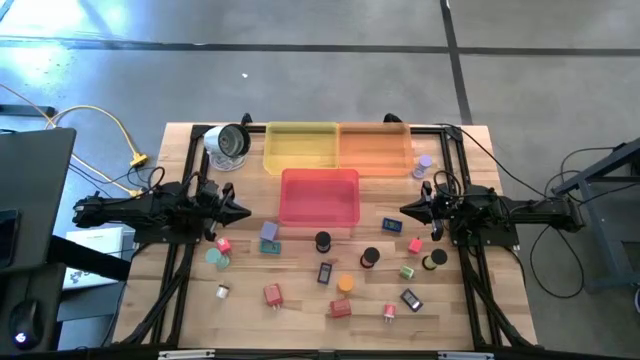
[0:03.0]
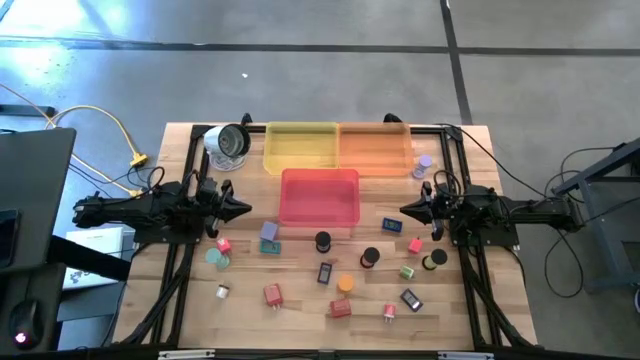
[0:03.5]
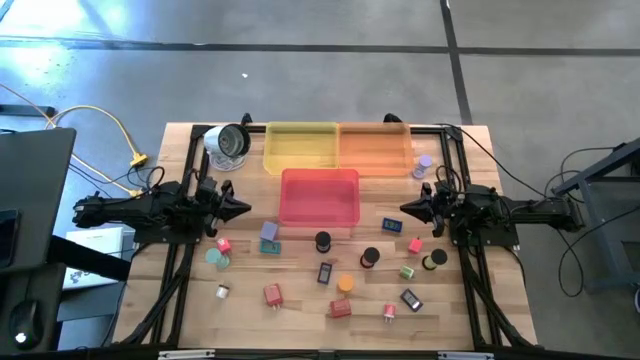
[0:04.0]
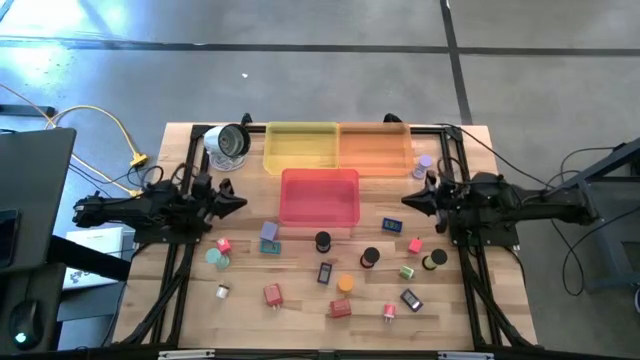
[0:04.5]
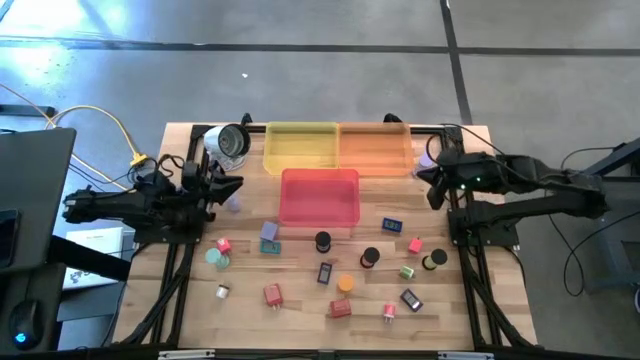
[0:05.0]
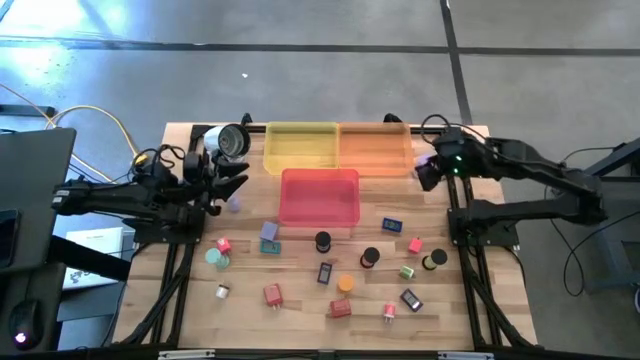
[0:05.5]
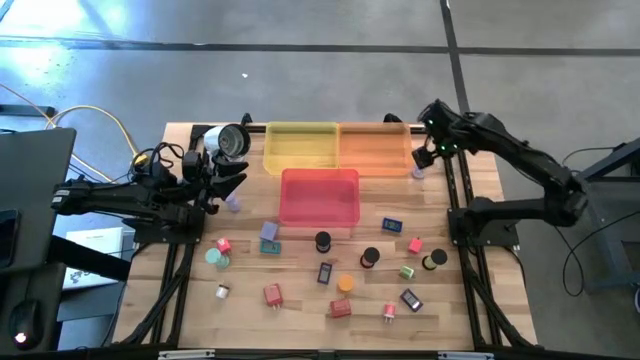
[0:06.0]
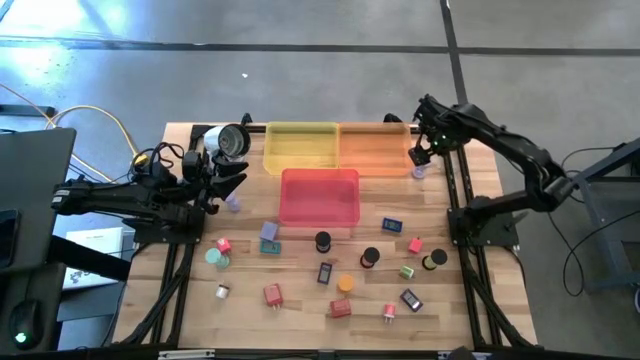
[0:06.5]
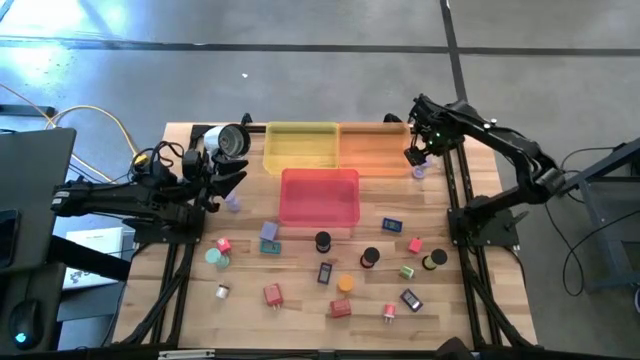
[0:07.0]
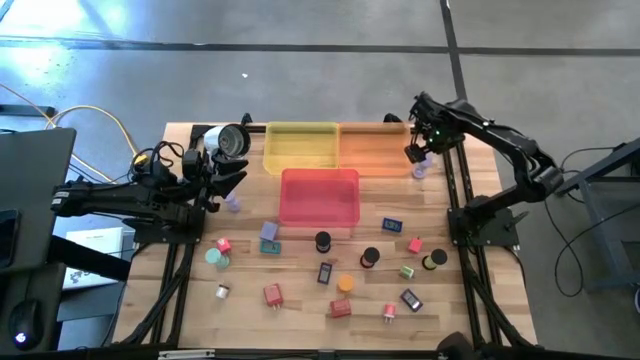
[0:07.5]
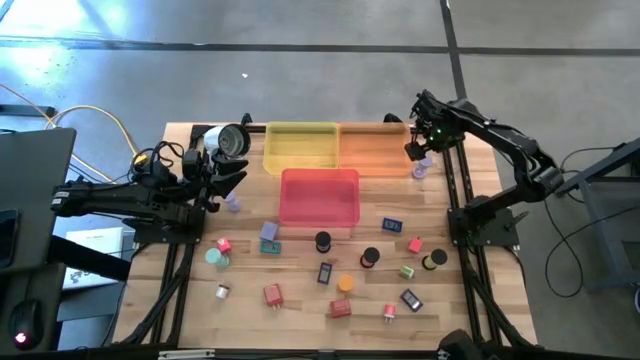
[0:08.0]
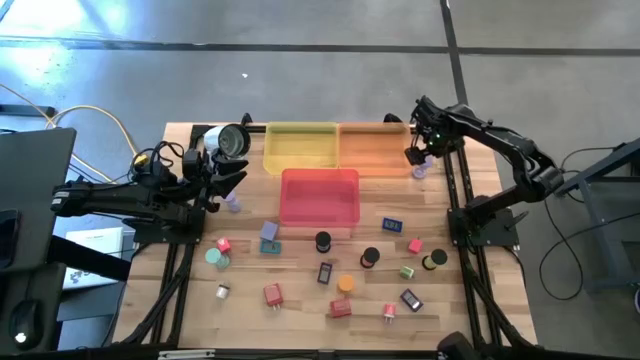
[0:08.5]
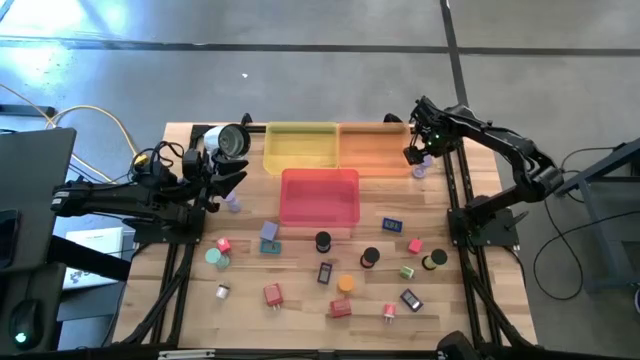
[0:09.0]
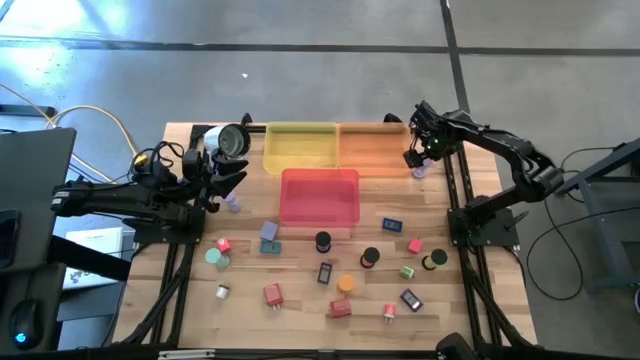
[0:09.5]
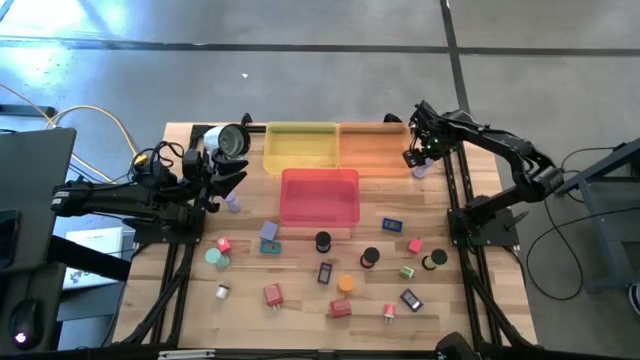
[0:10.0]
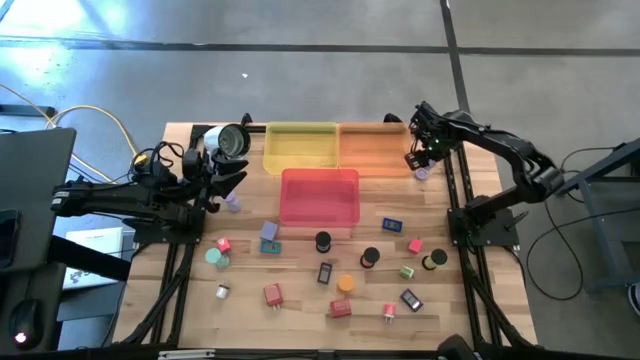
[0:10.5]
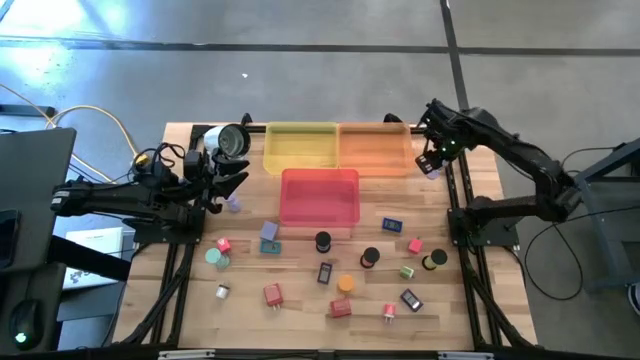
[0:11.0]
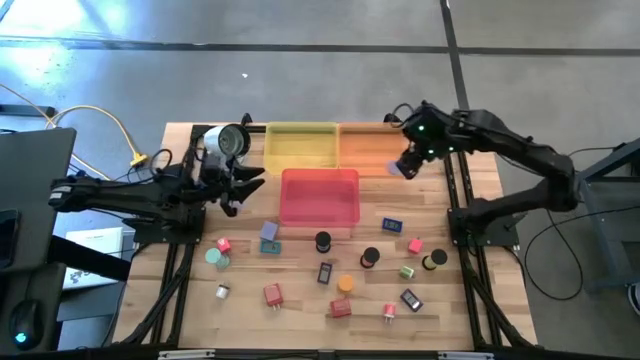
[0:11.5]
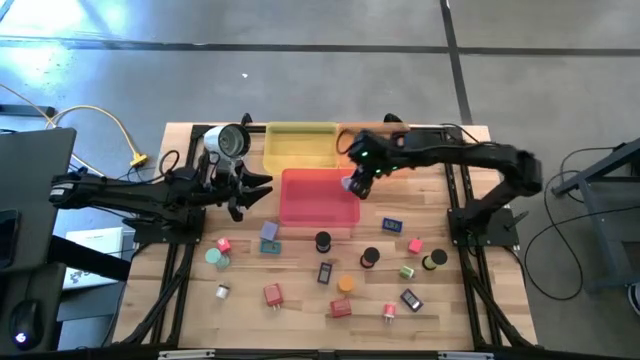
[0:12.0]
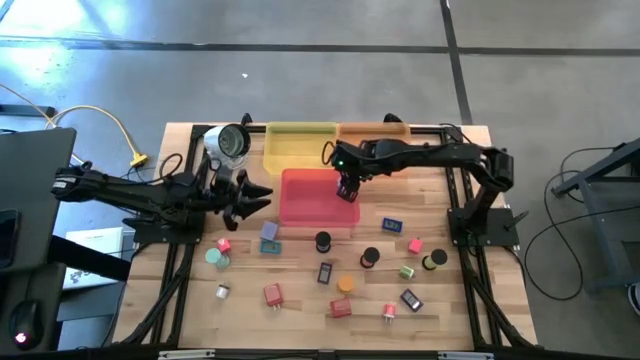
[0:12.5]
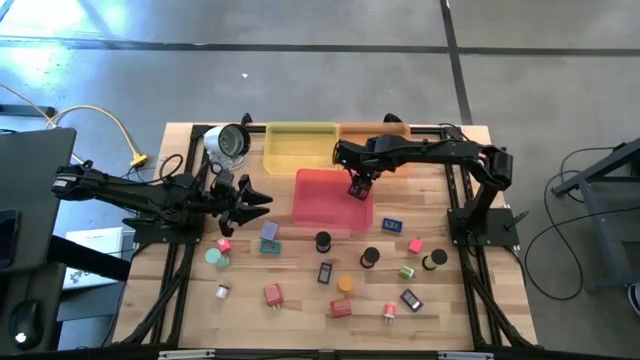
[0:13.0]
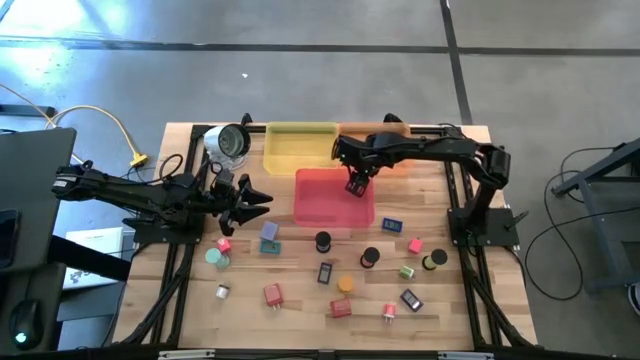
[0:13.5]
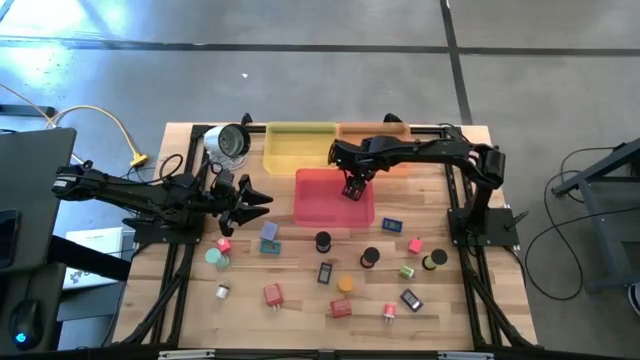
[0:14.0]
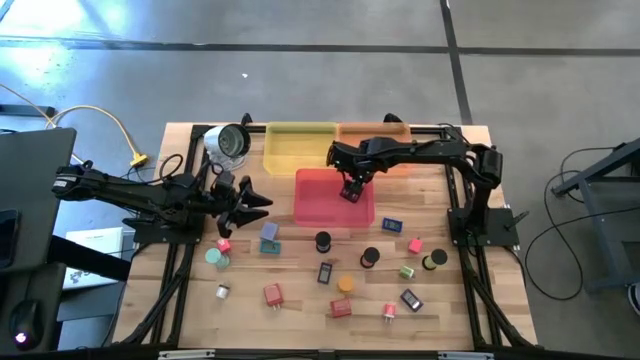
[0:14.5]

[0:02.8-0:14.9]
Task: Pick & Place Office items
Put the right violet hourglass into the red bin

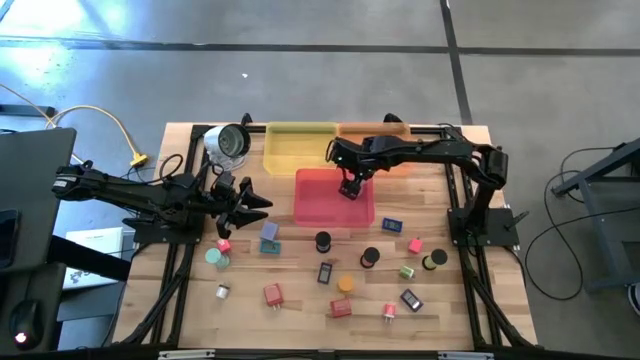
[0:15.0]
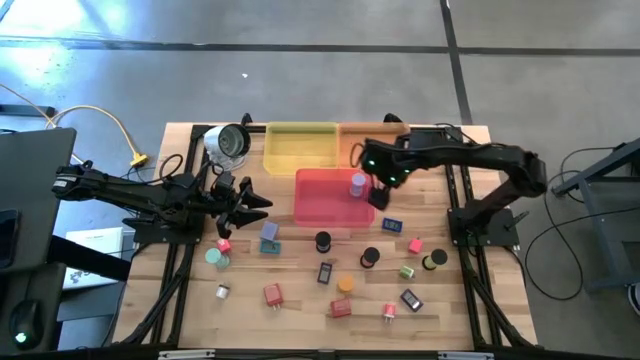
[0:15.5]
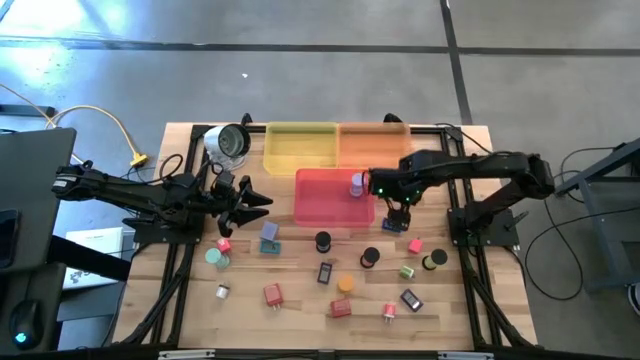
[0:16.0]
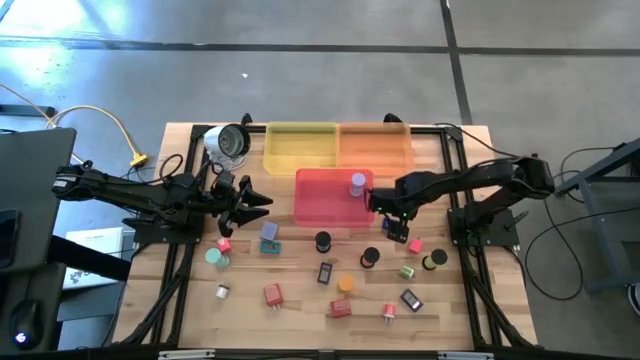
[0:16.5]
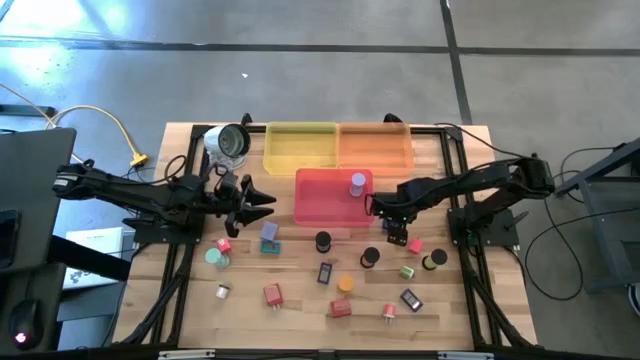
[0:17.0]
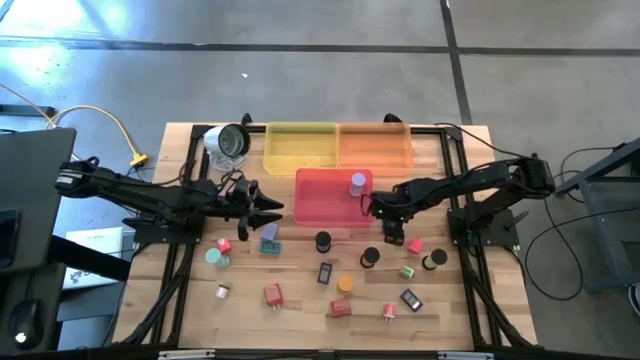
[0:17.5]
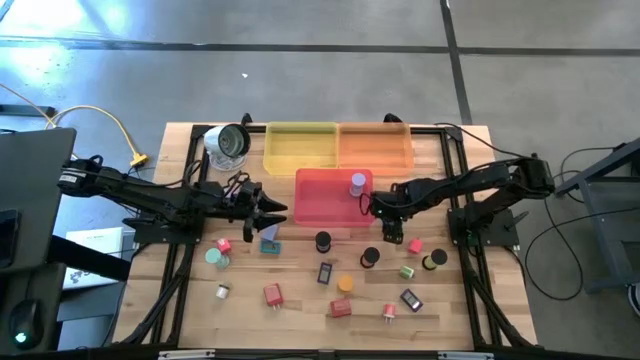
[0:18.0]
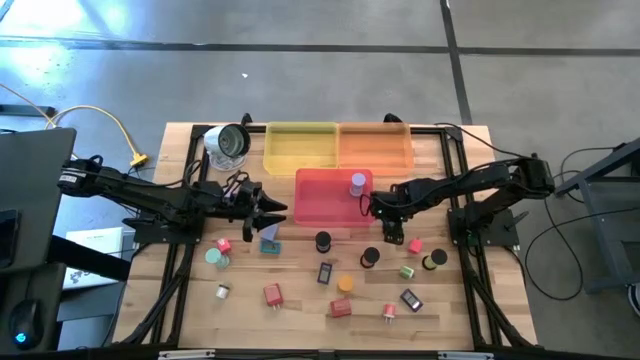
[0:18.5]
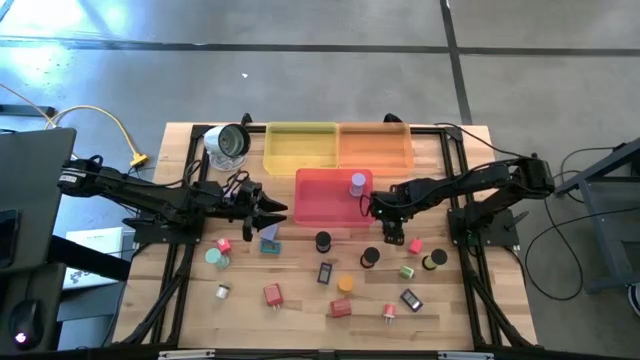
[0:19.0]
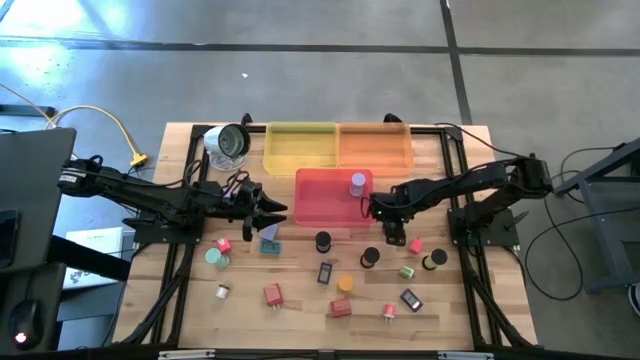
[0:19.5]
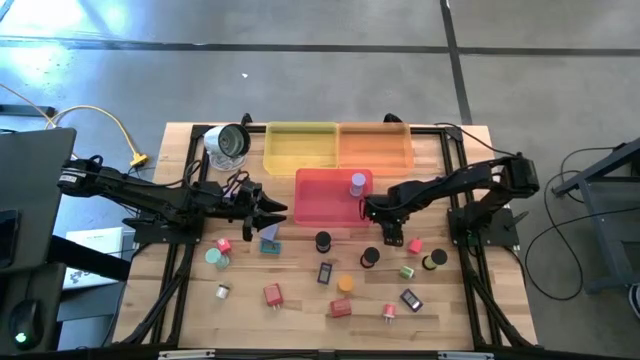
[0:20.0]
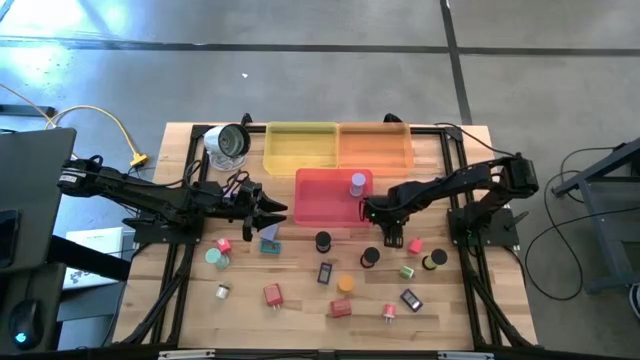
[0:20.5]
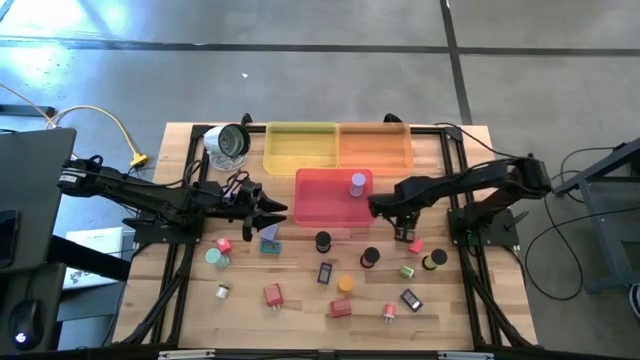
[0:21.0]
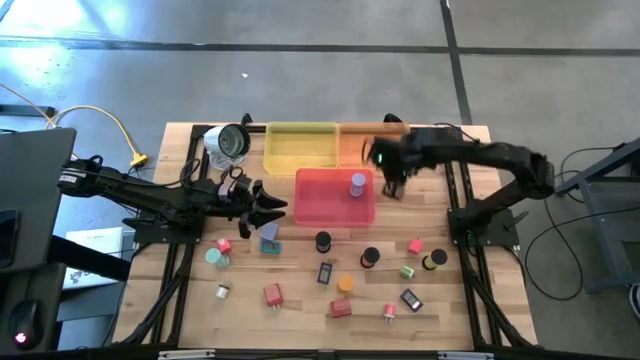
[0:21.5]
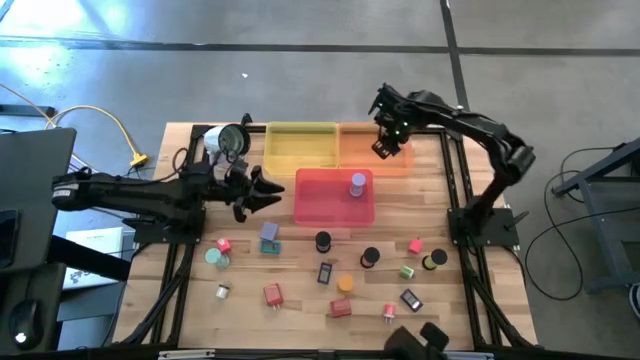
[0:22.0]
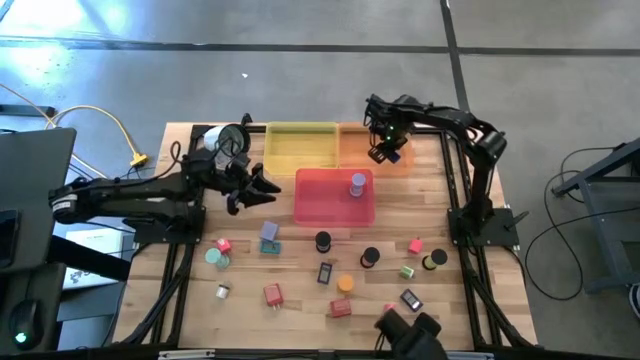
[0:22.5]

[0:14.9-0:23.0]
Put the blue digital clock into the orange bin

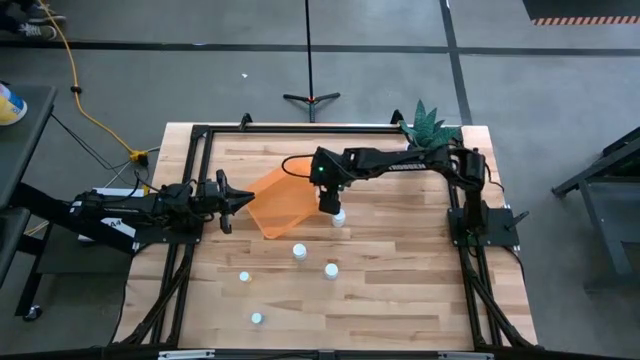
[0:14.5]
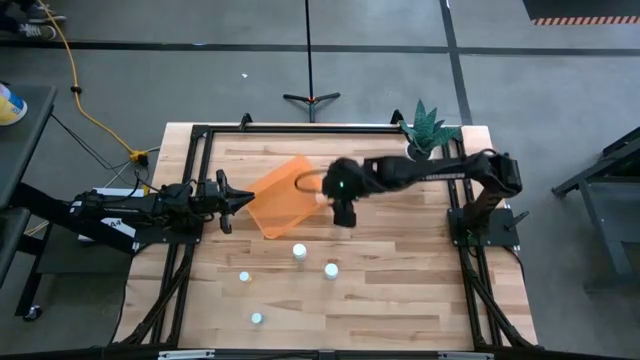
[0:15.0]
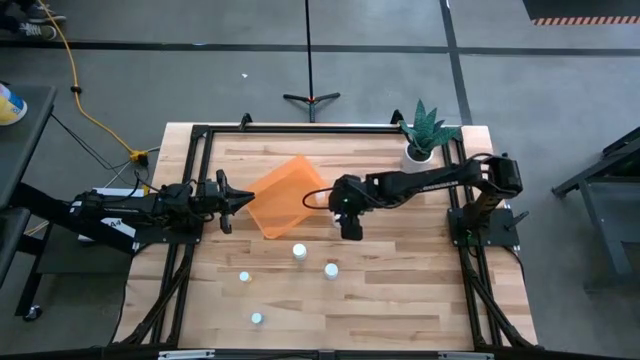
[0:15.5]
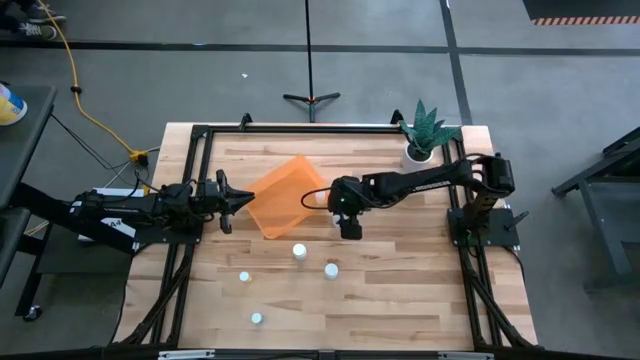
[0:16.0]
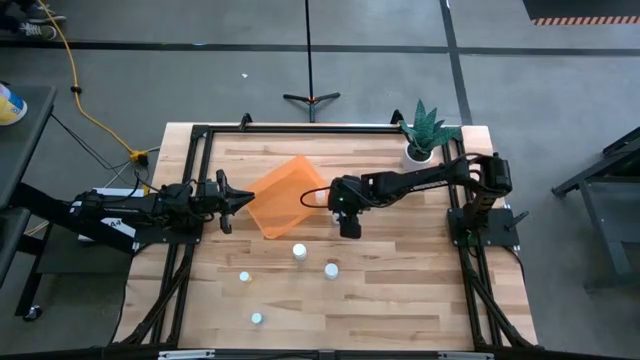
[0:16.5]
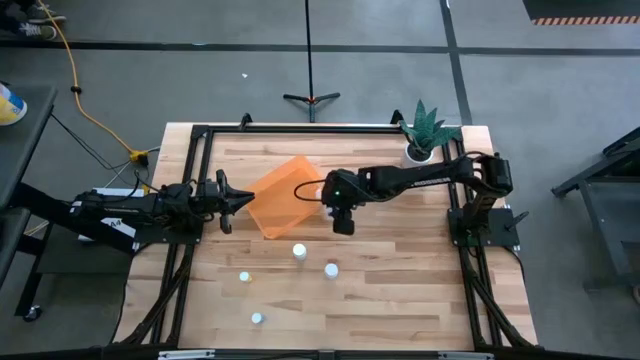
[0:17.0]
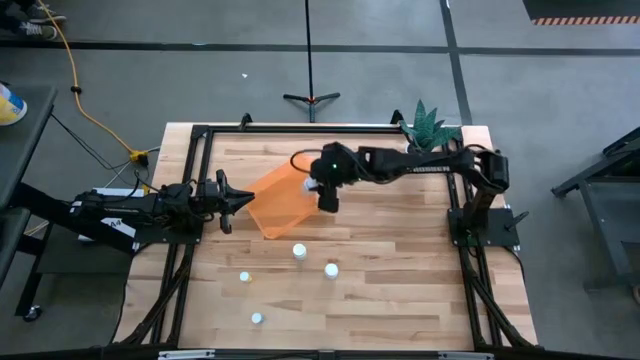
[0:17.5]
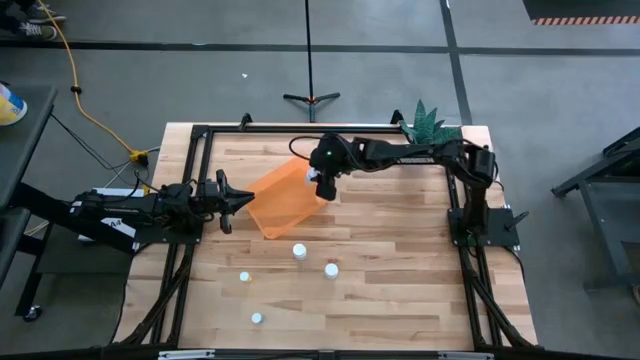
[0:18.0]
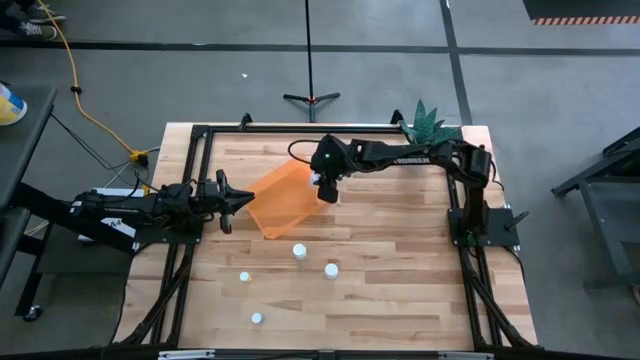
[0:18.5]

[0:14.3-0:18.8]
Task: Pick and place pill bottles into a basket
Put the top white pill bottle into the orange bin
